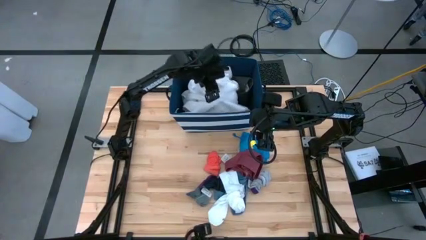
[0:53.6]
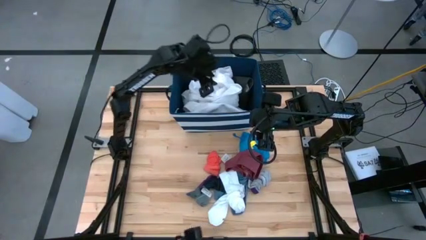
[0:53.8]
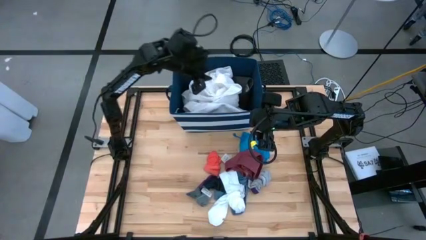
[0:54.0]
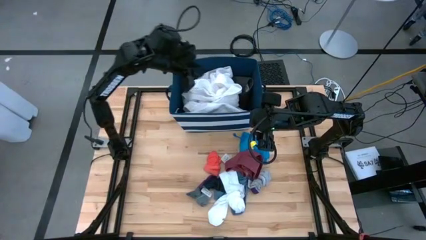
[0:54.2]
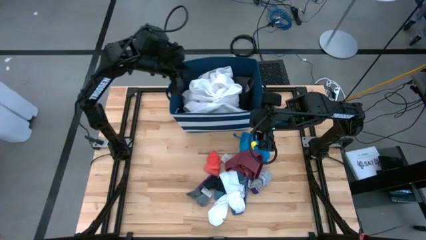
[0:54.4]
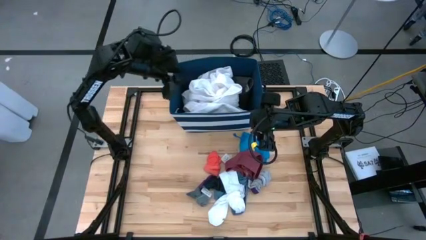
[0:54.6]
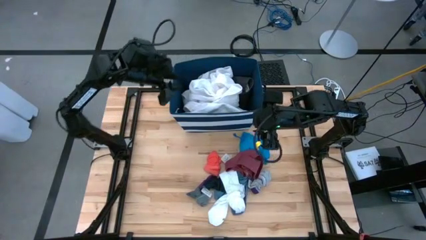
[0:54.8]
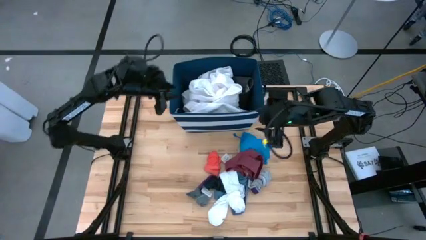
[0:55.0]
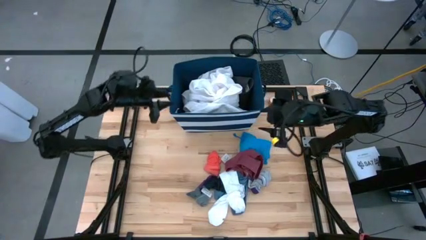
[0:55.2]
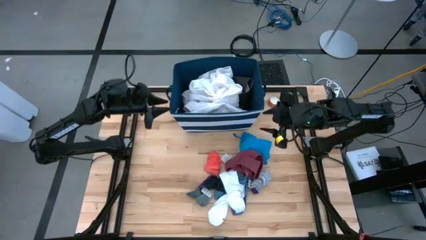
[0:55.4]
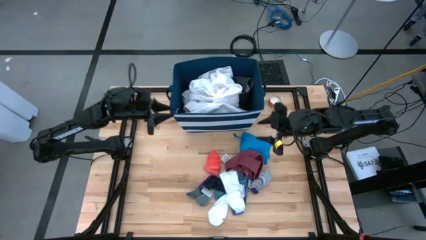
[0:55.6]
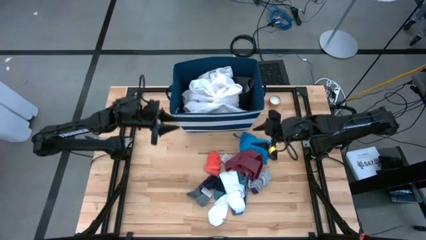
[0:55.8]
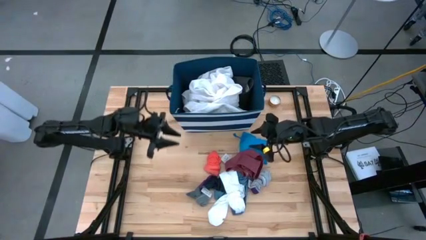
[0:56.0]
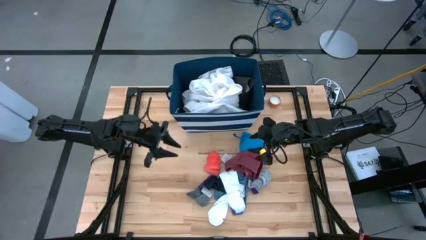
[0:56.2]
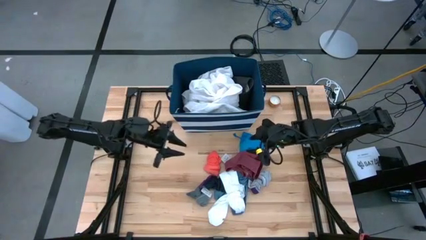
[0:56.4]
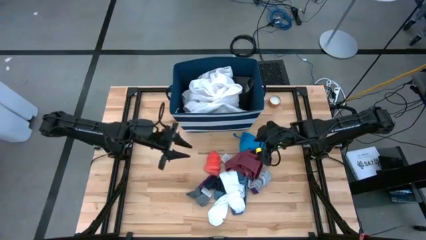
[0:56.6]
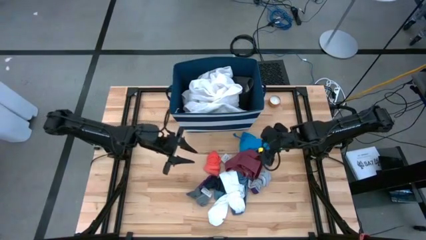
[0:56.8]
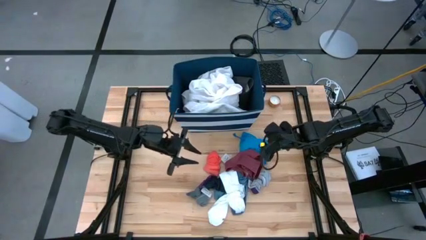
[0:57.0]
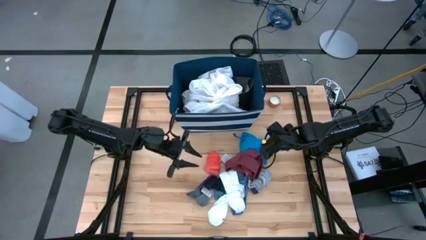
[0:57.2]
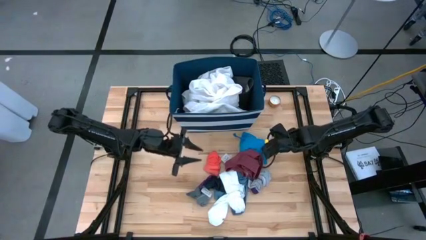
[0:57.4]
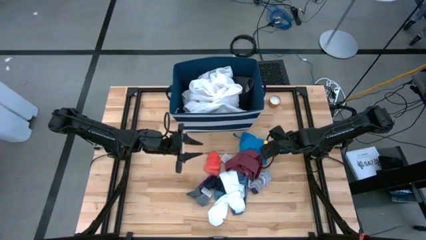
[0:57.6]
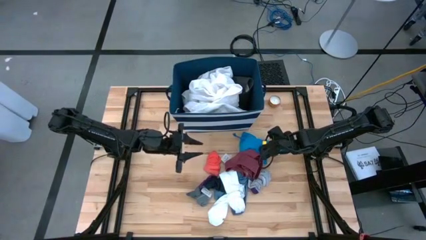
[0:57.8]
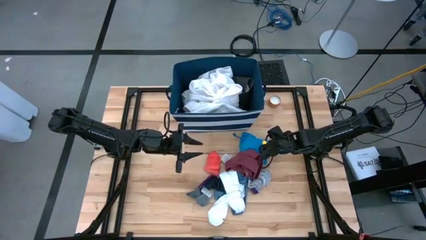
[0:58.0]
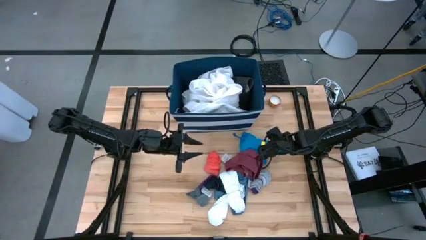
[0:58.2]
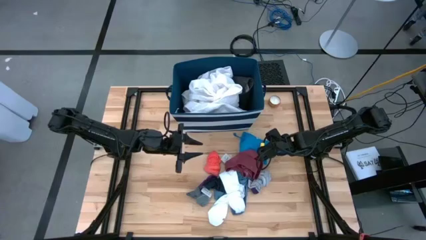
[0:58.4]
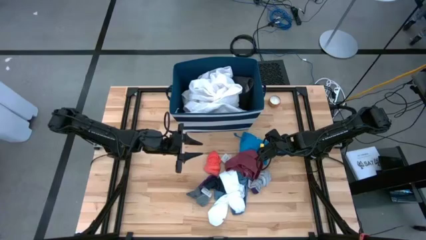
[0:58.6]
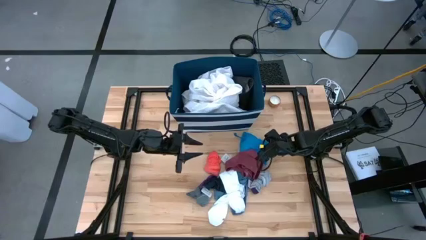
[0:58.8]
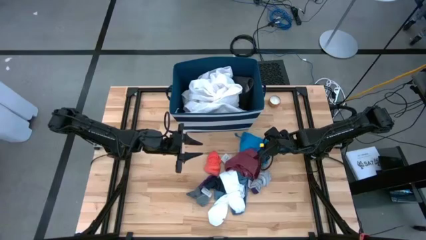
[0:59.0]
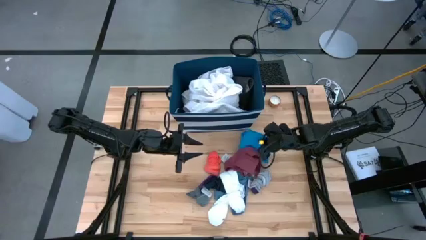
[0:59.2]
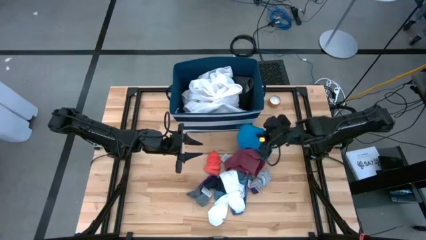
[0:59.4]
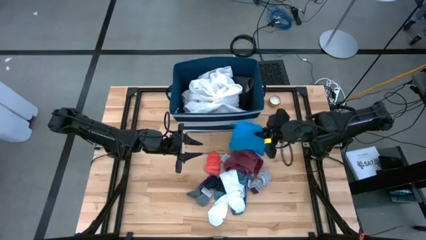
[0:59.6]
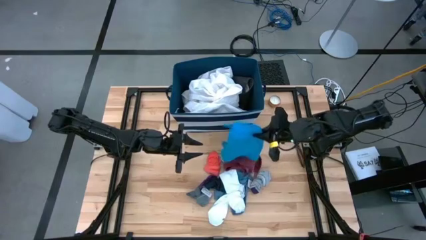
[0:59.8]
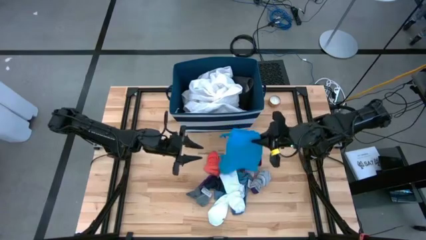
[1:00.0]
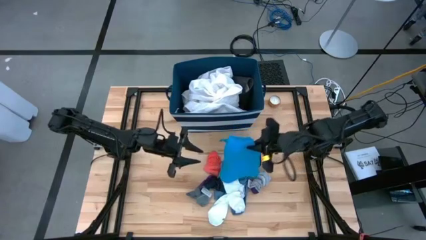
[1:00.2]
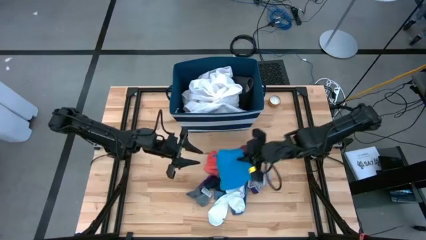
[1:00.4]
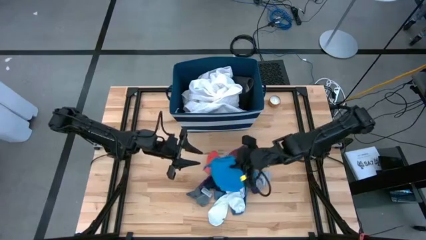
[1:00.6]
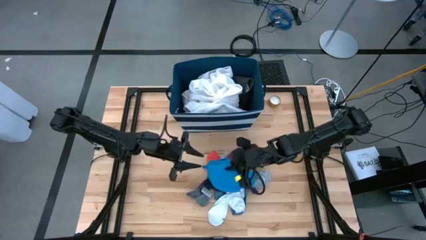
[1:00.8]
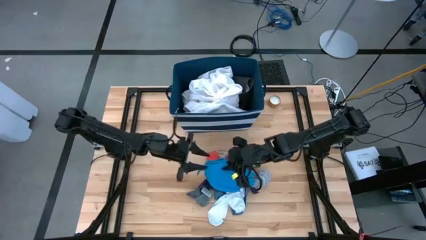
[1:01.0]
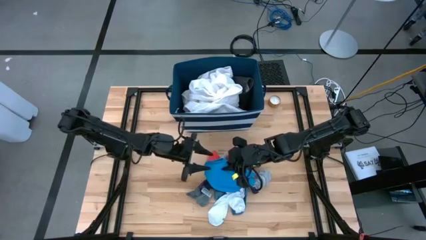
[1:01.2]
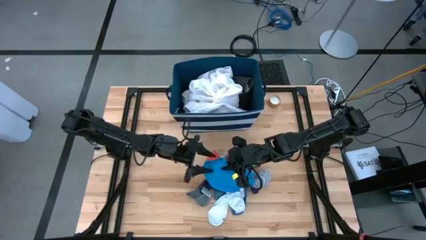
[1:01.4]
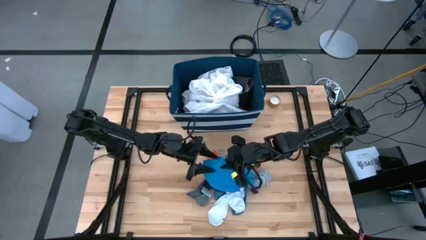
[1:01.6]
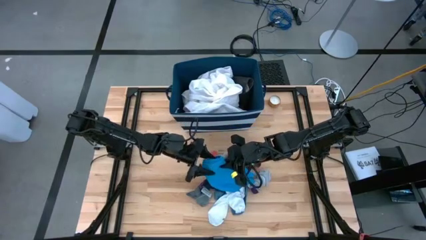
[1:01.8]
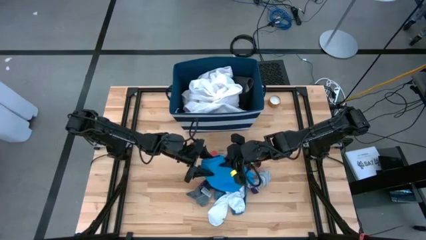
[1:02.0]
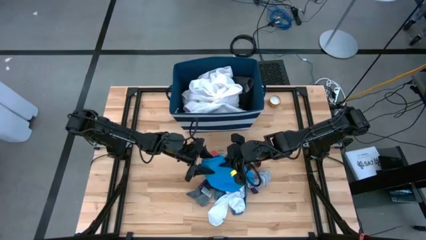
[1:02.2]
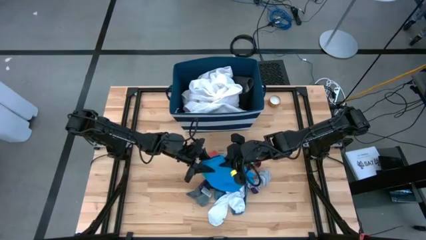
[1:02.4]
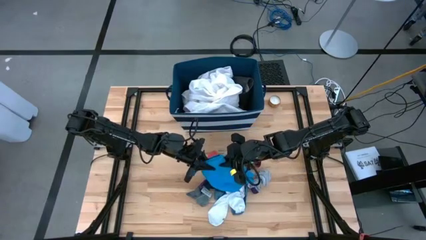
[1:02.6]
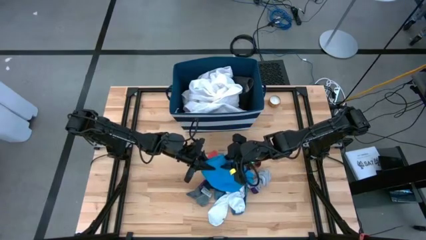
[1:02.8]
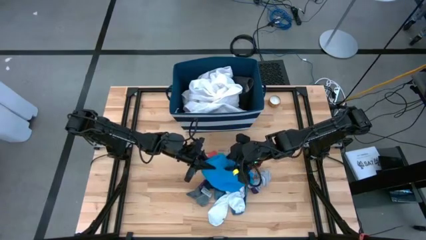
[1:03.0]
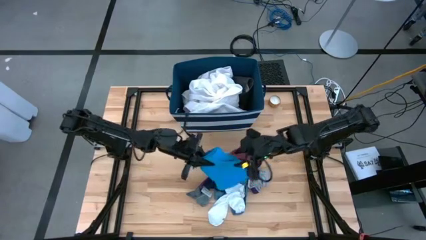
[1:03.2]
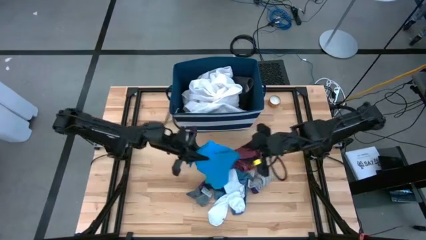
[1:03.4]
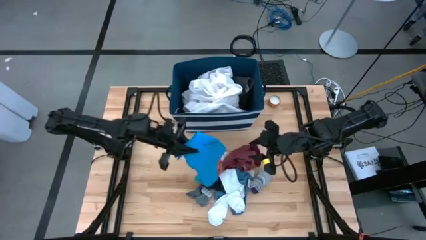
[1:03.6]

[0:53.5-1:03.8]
Task: Sort clothes
Put the blue shorts into the blue laundry organizer

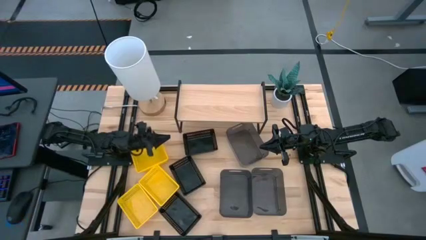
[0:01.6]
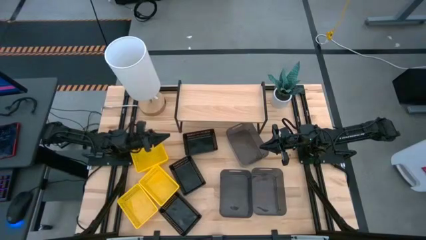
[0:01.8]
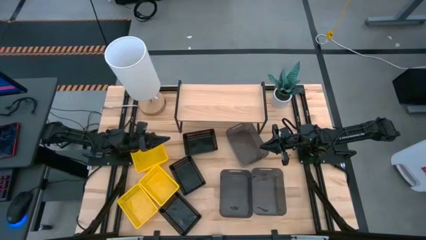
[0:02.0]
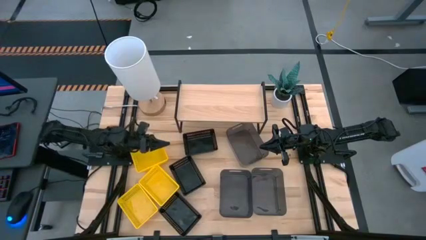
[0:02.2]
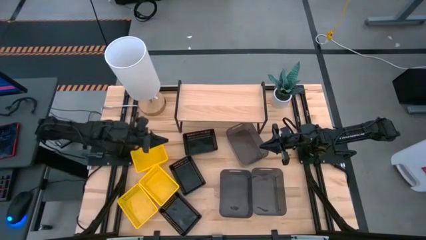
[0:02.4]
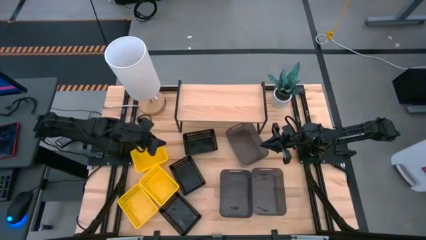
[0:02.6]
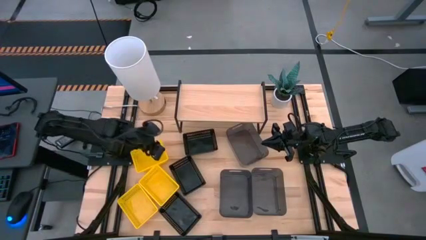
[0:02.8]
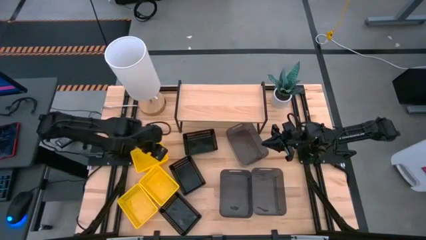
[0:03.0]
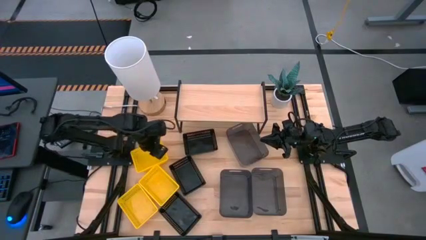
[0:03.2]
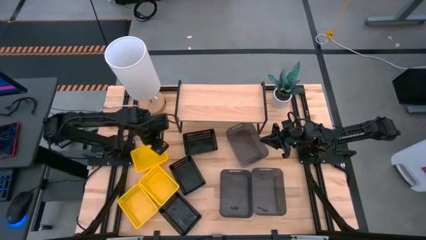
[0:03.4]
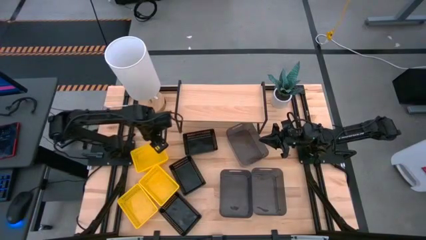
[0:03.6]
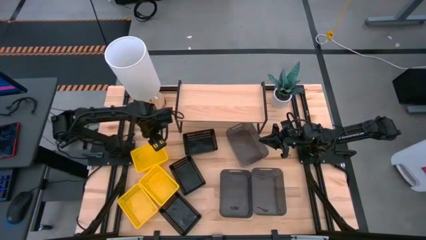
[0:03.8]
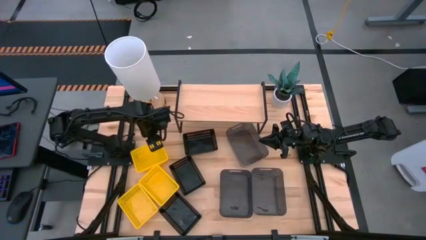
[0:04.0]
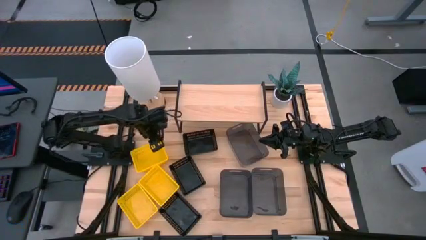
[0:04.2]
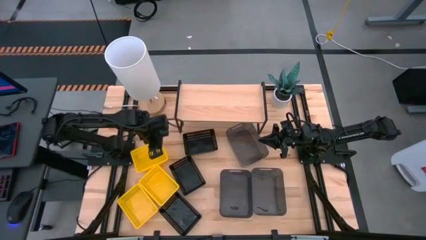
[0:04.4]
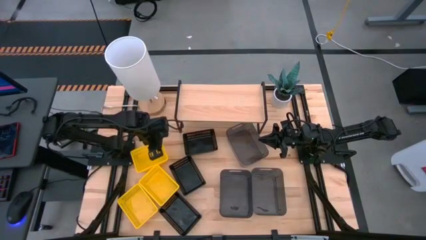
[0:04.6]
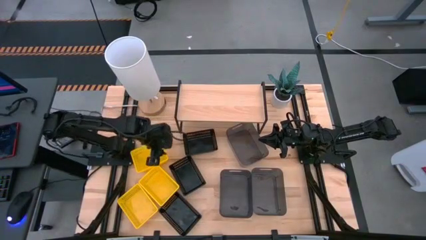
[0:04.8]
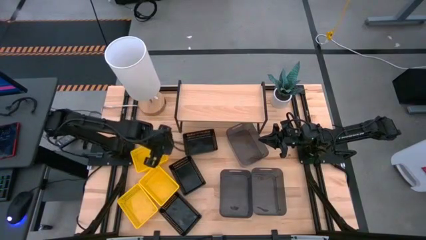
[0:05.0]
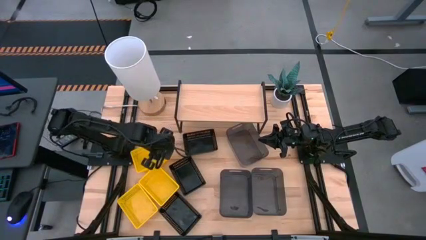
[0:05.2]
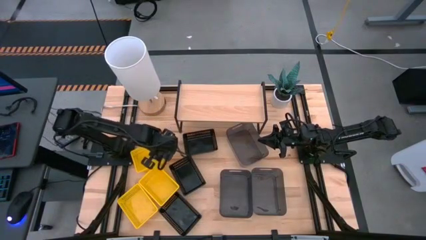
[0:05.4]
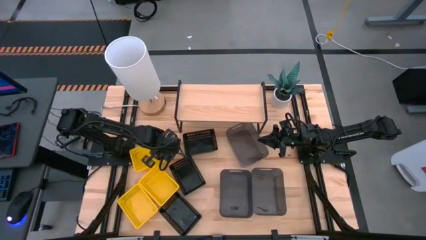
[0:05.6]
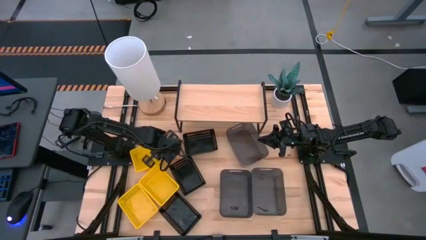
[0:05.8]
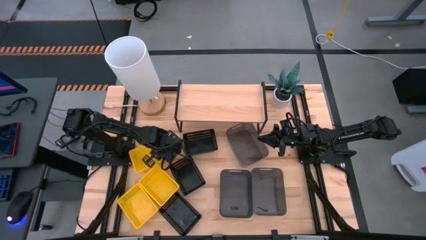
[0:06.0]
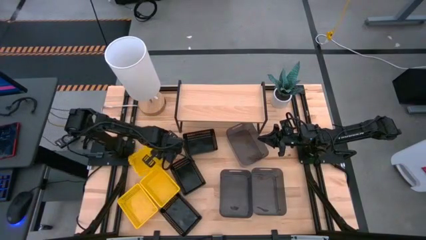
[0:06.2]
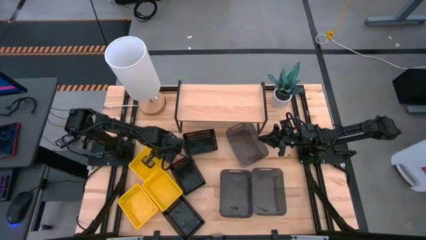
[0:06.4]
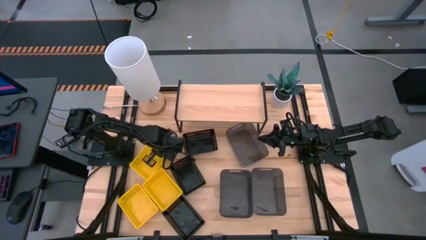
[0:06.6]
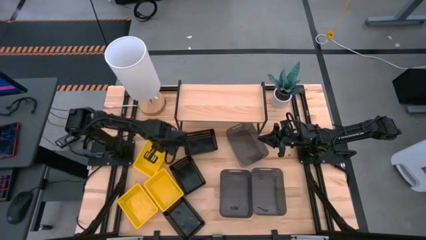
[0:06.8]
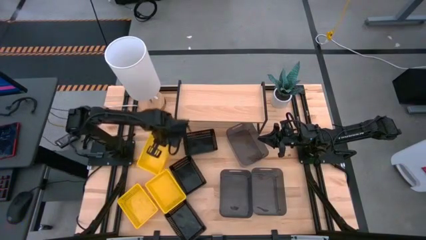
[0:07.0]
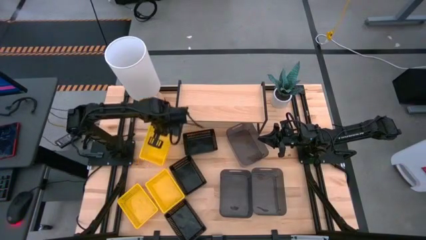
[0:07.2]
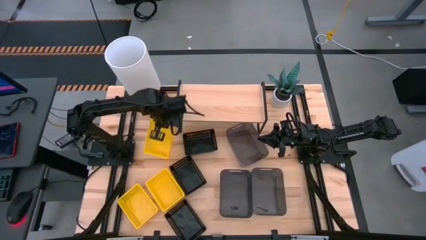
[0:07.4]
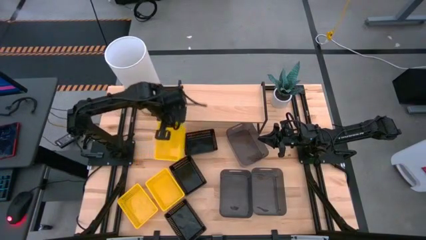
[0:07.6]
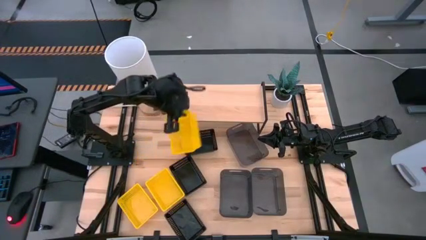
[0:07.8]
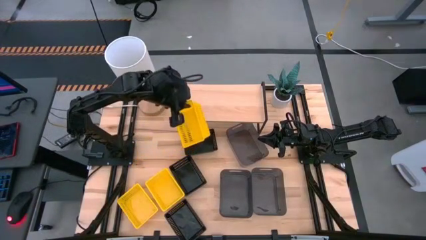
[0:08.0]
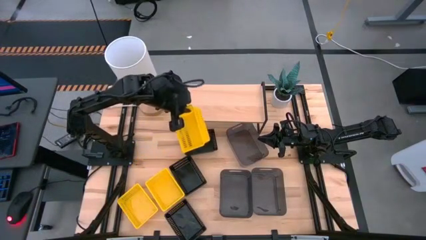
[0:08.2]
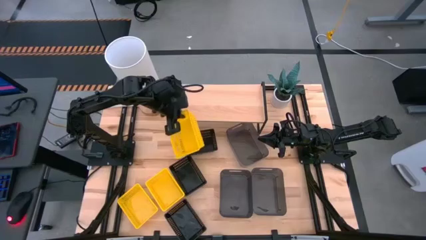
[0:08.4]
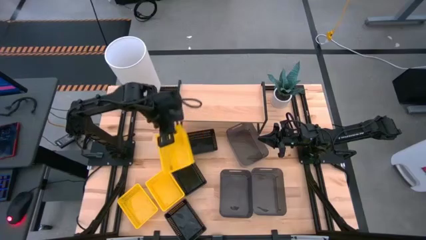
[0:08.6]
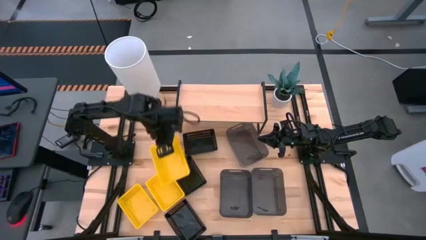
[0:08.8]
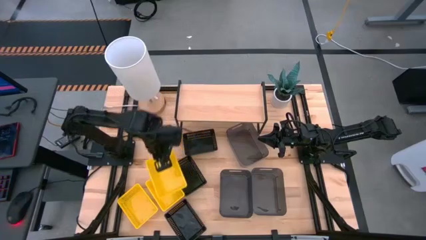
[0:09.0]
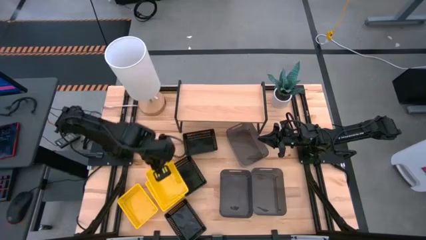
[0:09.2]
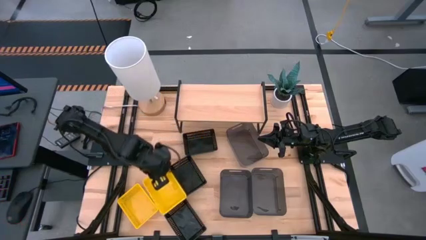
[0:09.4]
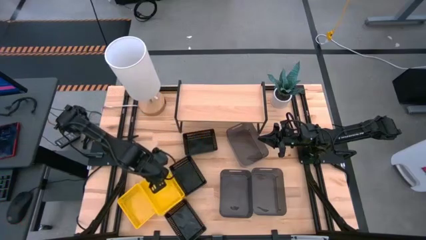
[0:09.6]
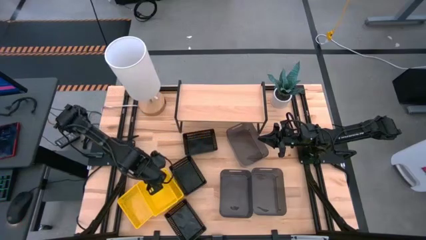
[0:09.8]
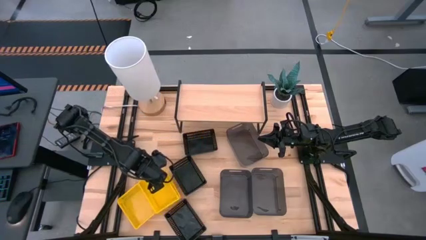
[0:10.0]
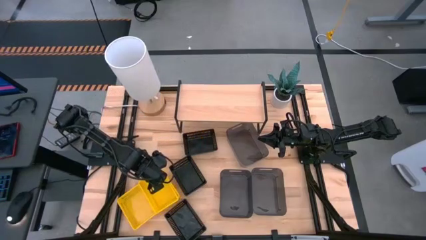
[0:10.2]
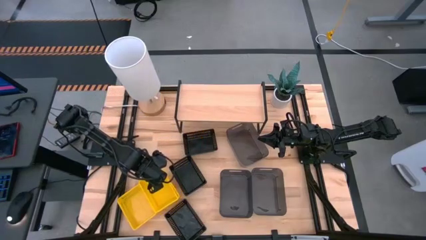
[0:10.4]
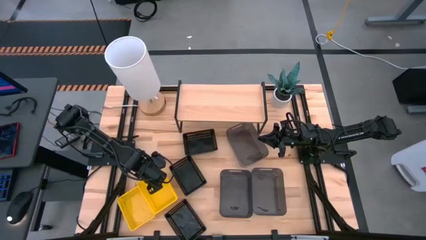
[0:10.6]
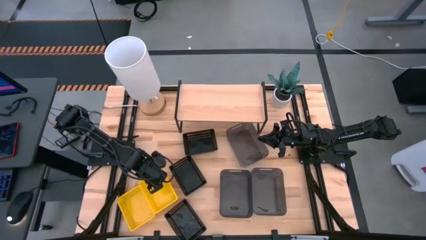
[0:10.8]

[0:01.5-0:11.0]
Task: Stack baskets on shelf by color
Stack the top yellow bin on the middle yellow bin on the table
